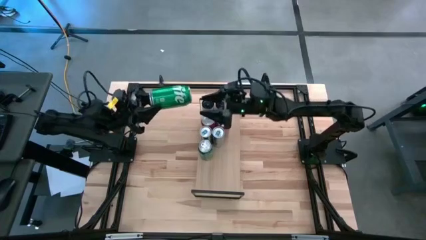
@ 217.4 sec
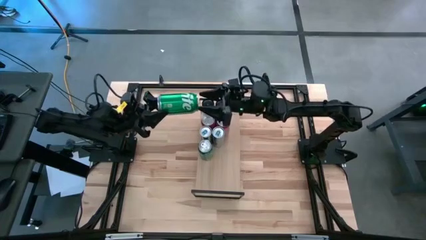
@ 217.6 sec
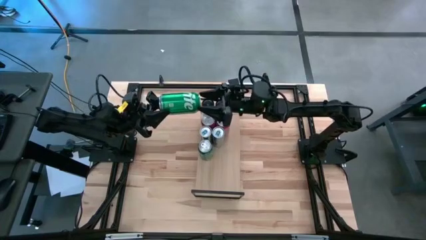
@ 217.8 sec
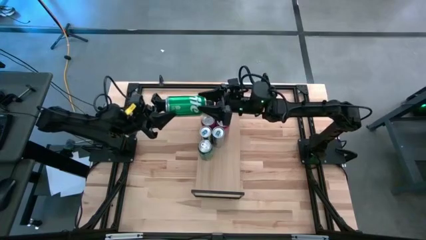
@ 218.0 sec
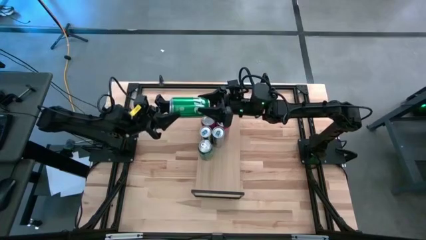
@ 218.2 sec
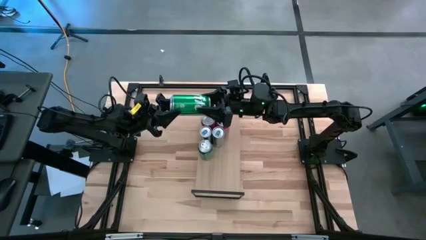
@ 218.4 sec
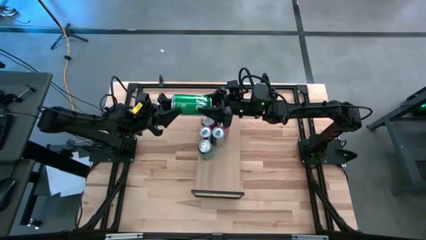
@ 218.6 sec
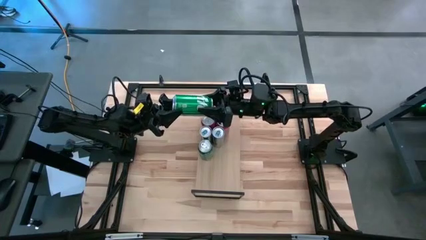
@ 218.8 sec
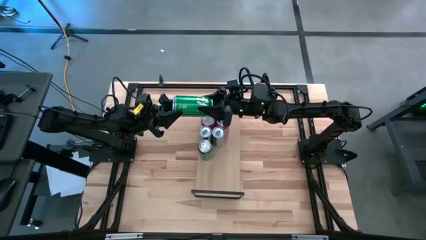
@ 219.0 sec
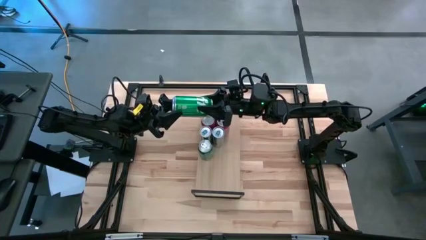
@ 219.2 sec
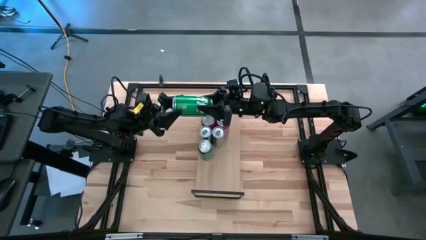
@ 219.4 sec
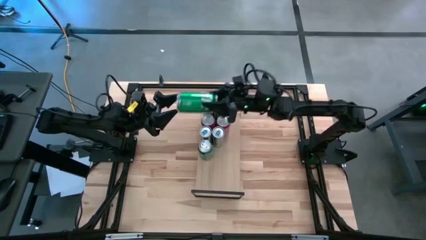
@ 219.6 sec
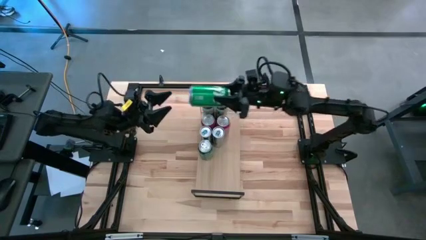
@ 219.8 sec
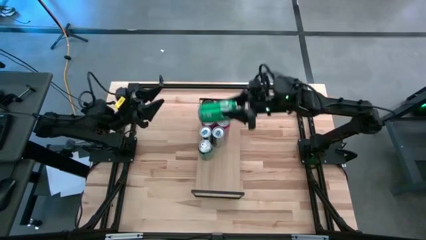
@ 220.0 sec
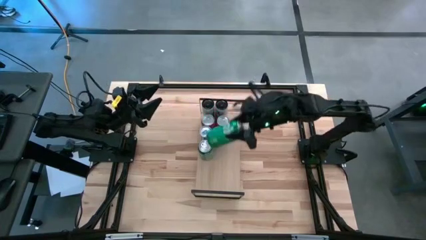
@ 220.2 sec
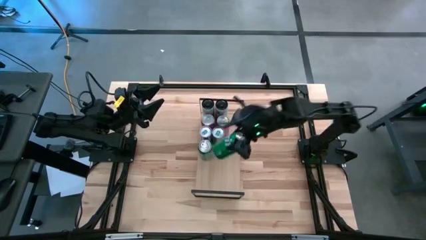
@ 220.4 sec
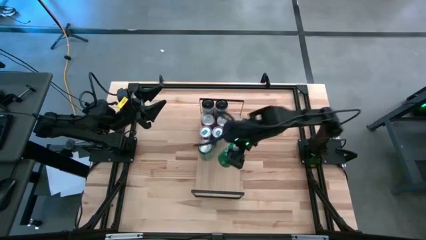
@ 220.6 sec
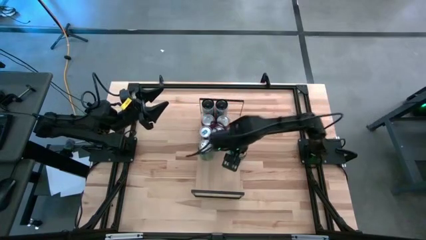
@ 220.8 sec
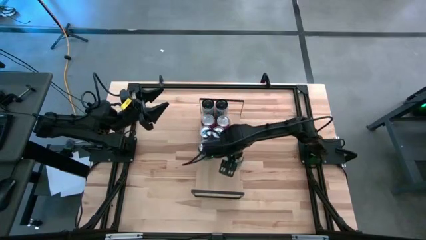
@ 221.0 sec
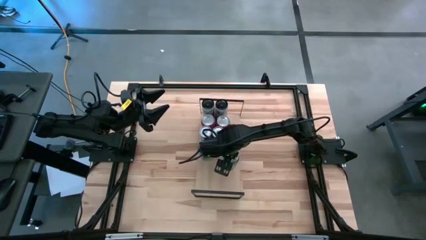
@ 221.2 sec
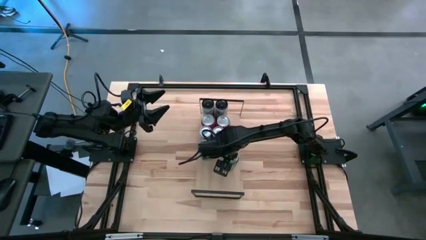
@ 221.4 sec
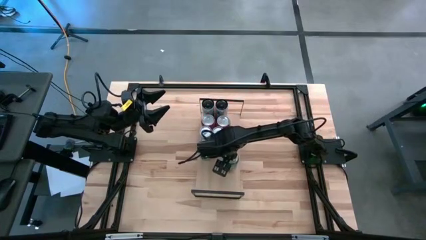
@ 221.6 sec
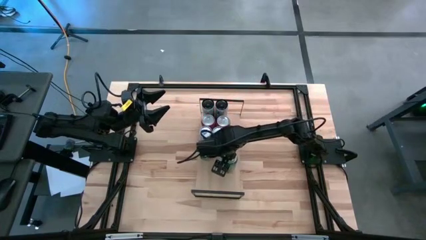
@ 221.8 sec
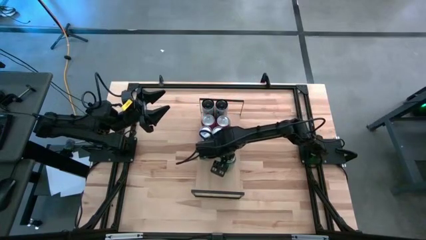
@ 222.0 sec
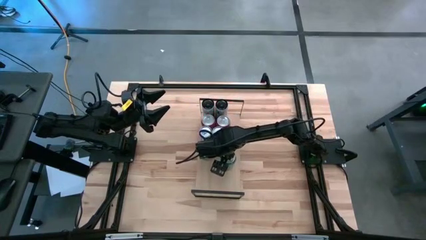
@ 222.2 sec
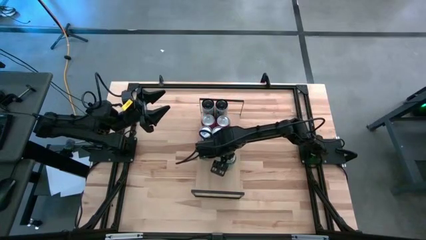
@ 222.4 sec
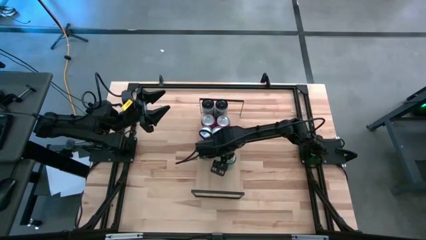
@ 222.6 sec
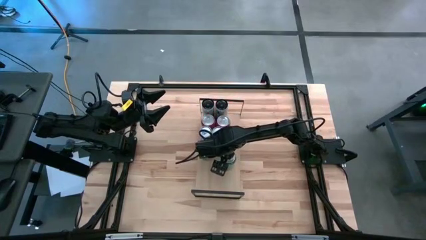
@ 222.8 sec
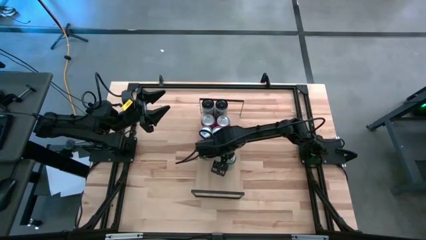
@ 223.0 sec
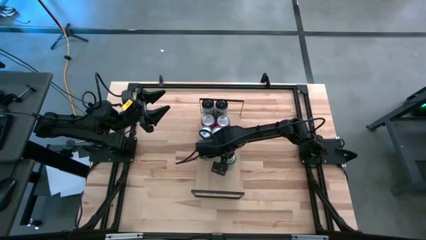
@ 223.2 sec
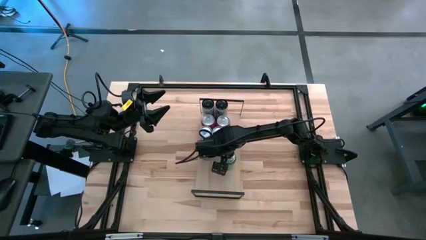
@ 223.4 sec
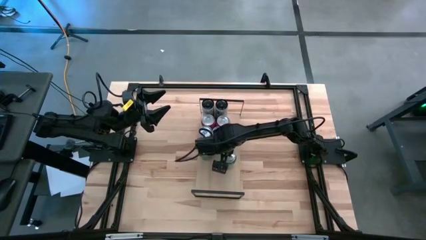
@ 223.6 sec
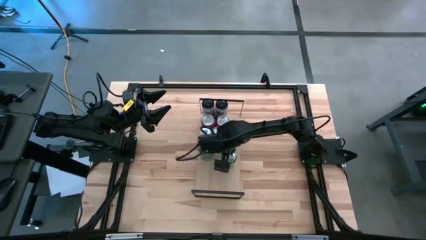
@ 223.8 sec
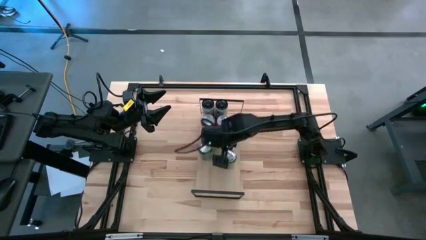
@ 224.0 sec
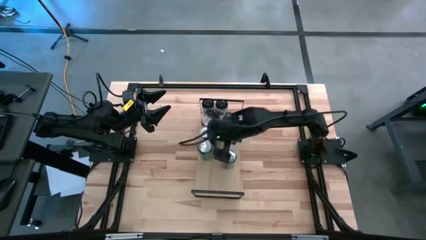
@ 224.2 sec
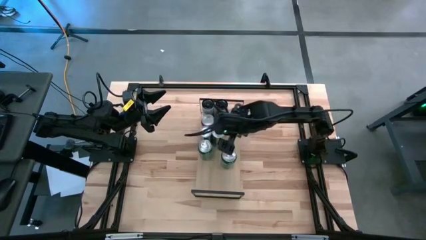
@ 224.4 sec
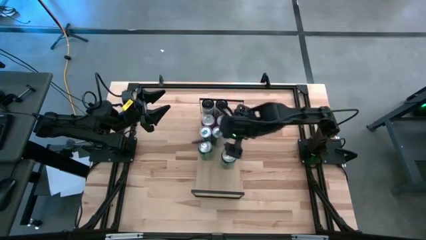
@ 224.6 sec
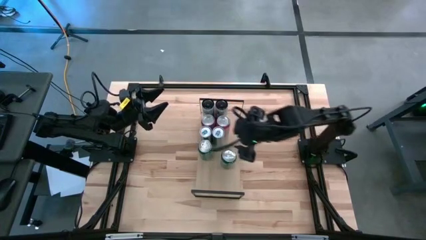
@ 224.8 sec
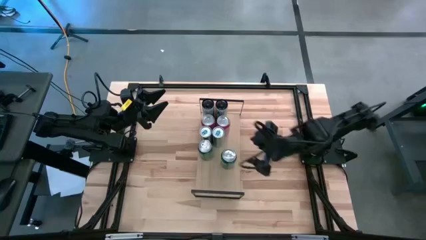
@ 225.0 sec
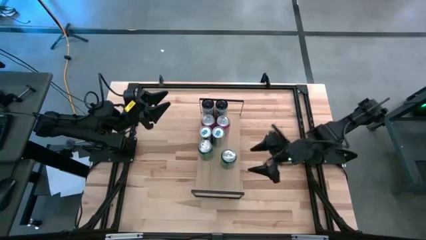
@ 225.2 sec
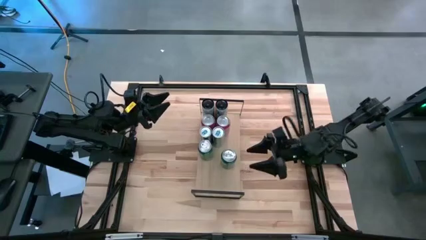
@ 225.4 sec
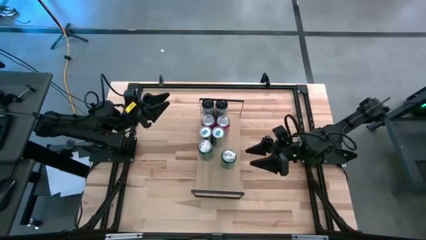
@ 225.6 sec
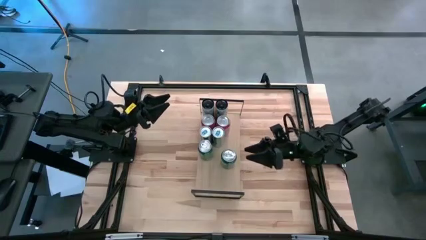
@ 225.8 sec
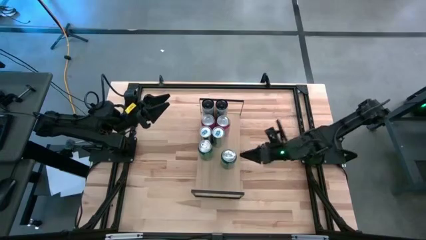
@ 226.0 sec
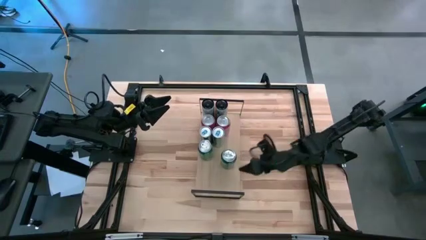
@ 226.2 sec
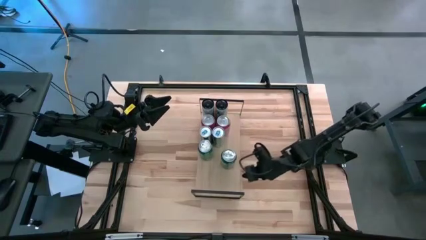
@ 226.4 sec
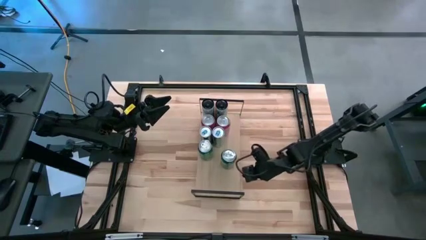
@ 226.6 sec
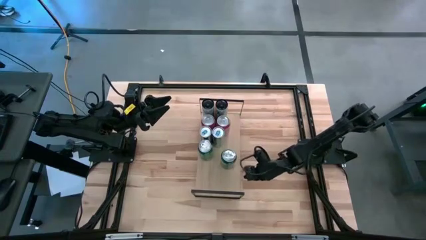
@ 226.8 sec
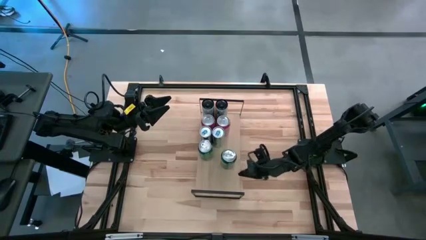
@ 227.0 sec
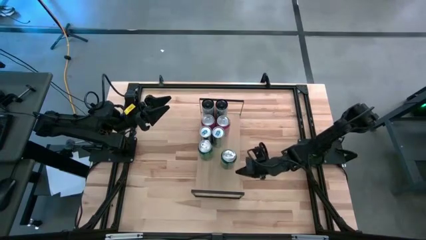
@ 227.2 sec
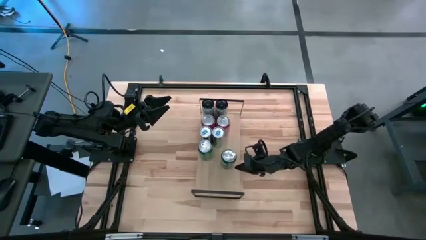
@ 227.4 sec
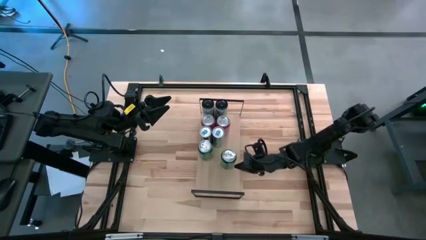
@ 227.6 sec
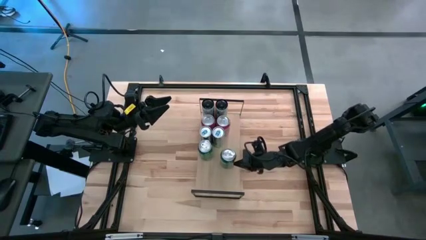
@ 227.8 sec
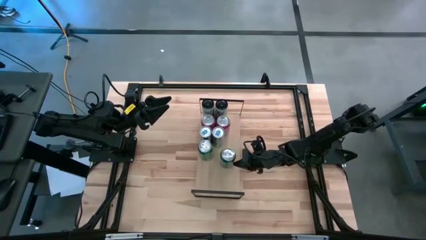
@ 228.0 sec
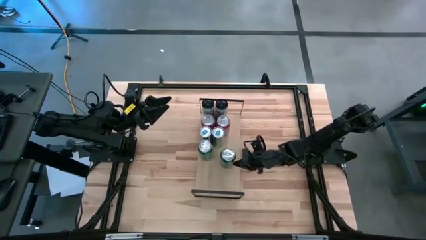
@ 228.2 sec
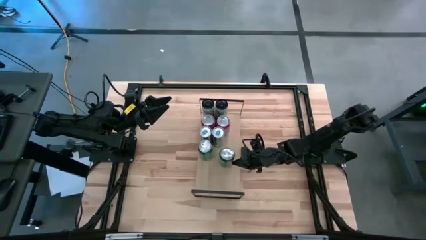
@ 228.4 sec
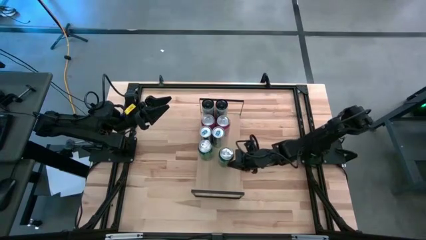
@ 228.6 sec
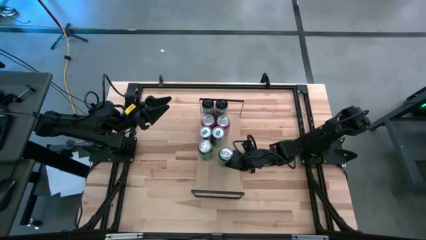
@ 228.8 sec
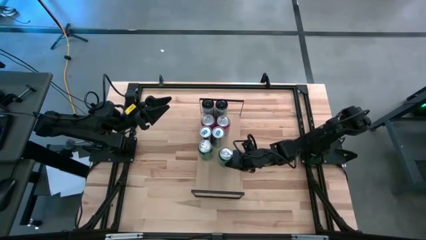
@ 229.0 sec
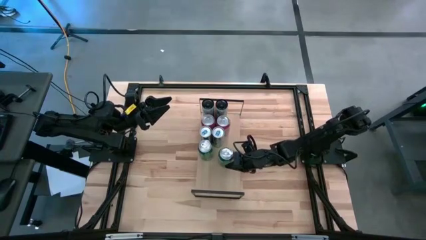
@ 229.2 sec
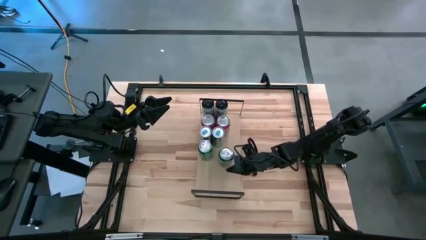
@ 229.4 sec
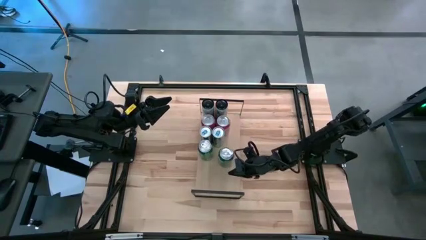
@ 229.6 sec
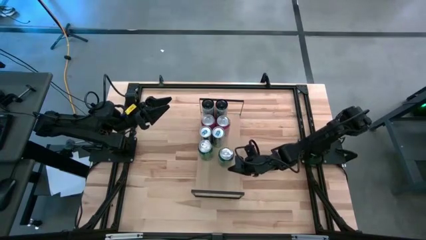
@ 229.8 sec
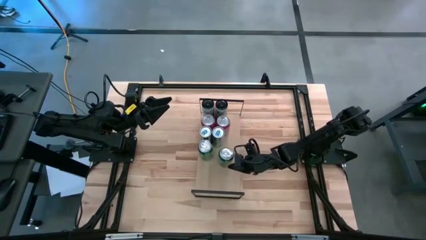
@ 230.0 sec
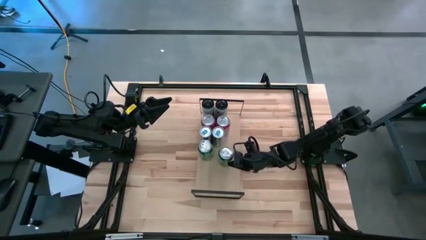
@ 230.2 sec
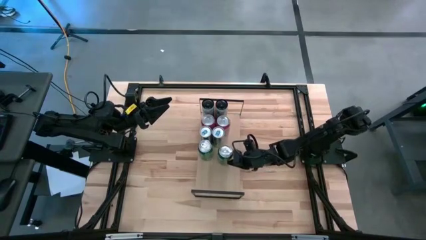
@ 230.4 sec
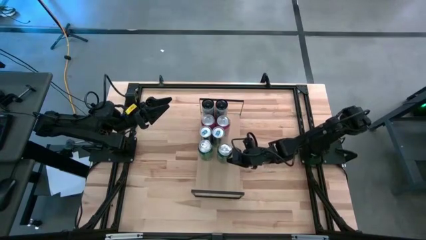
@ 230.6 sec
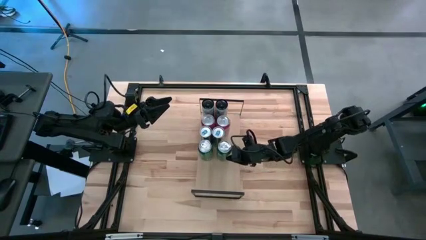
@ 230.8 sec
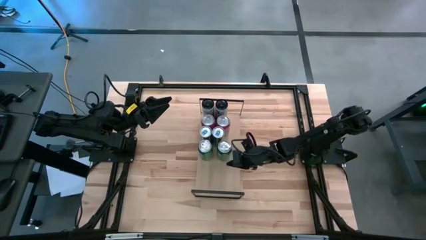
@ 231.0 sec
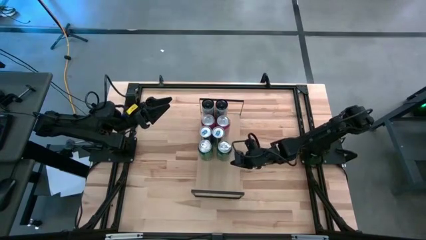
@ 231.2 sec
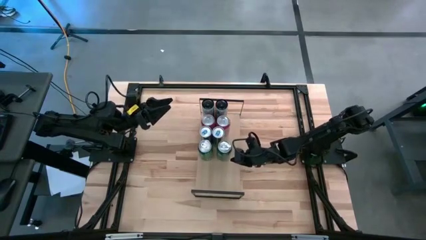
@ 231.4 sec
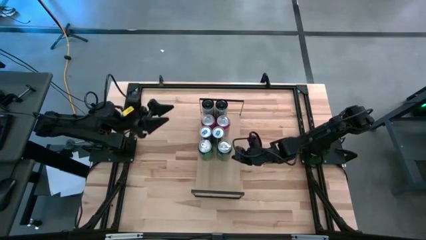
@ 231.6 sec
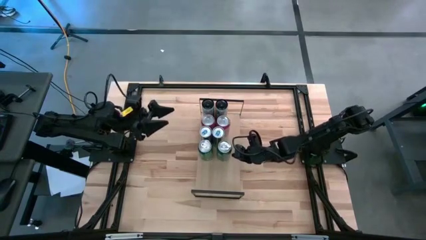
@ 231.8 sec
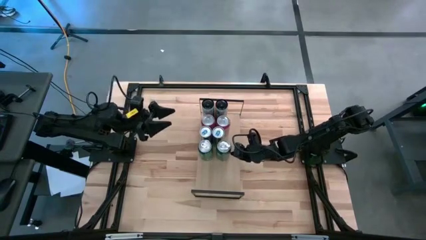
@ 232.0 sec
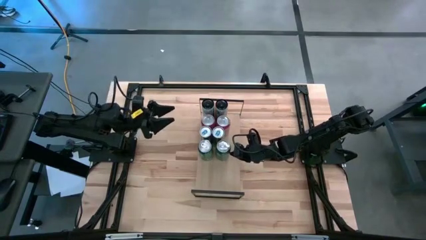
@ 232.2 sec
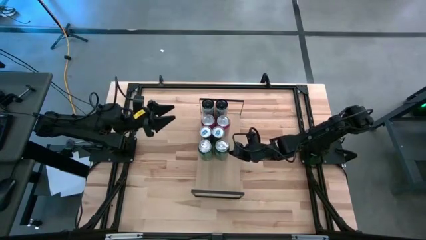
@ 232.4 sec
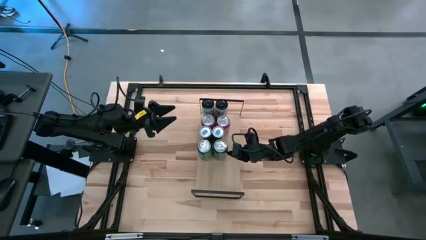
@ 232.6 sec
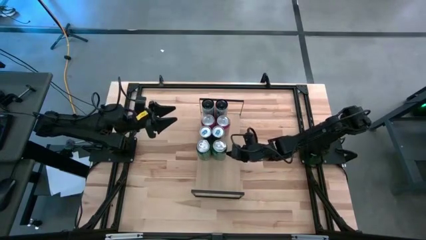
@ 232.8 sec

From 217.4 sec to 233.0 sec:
Task: Place canned beverage on shelf
Put the green soda can, aligned with the other green soda can on the shelf
